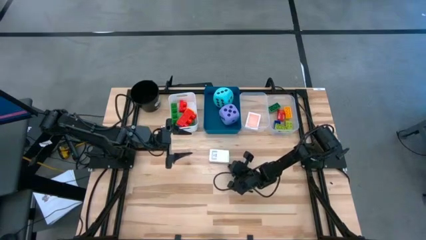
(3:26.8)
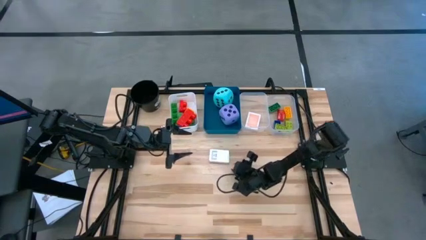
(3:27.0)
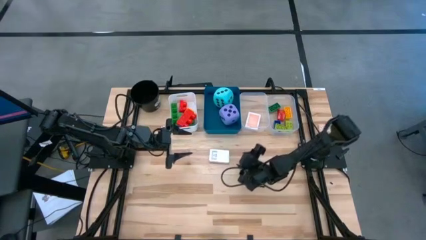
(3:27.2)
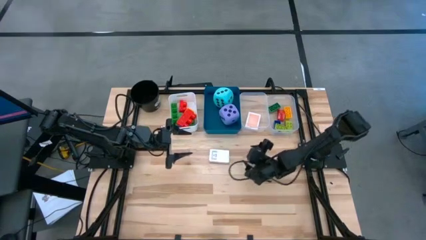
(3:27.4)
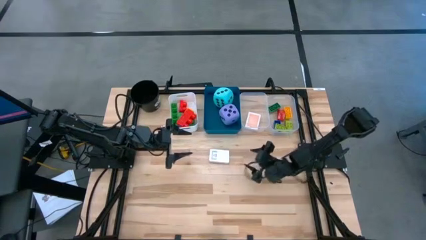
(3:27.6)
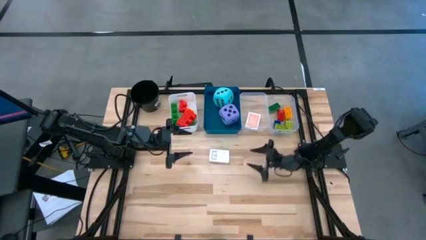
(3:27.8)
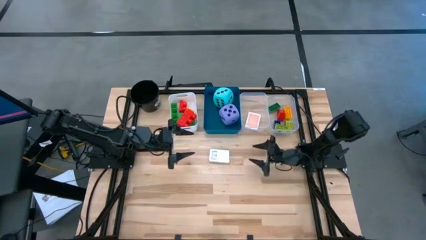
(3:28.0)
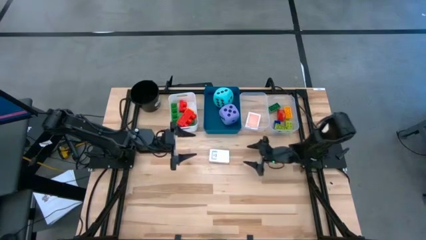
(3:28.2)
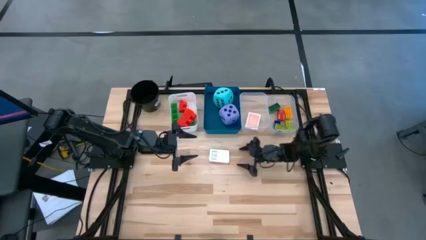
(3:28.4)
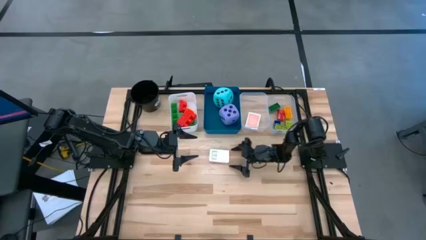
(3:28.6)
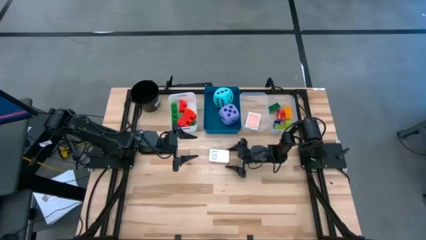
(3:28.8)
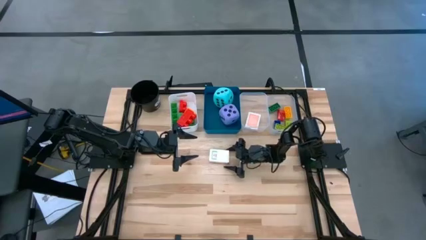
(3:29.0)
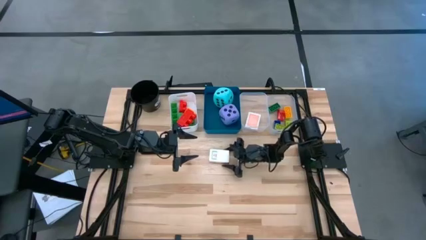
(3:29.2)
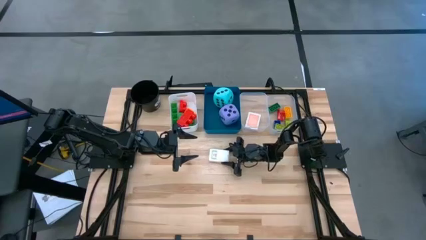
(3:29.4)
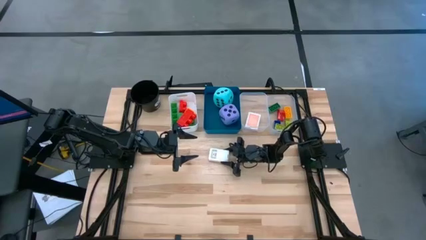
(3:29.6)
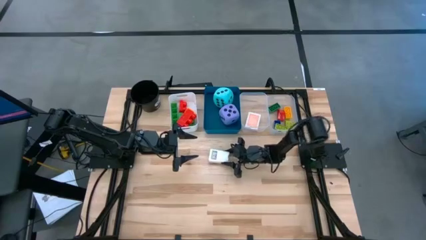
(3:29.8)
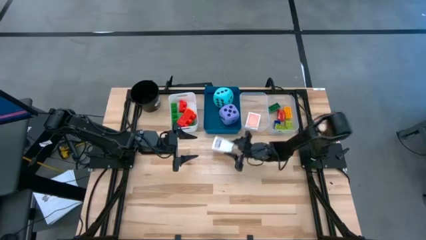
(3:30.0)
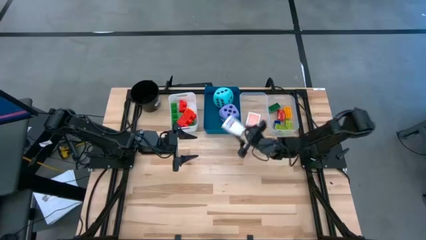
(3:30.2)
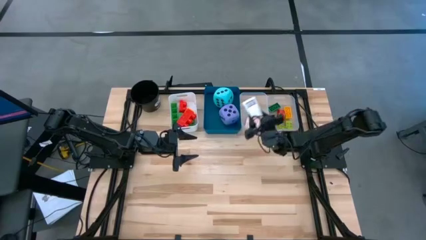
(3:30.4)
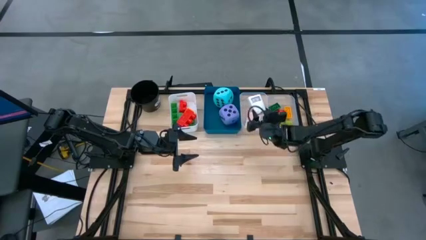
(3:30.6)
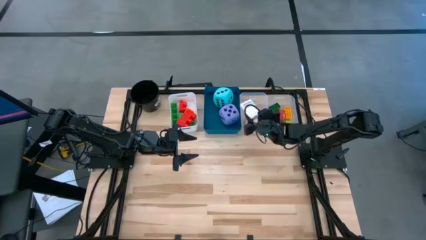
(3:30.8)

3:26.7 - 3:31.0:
Task: Pick & Place Toys
Put the white deck of cards into the left transparent bin

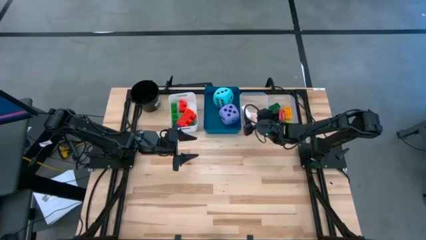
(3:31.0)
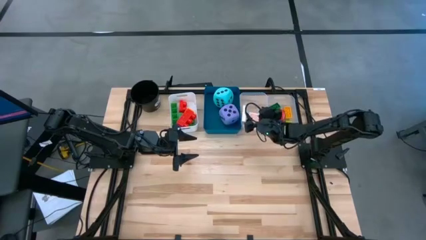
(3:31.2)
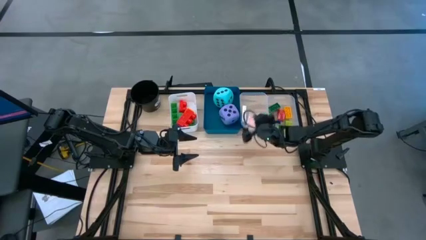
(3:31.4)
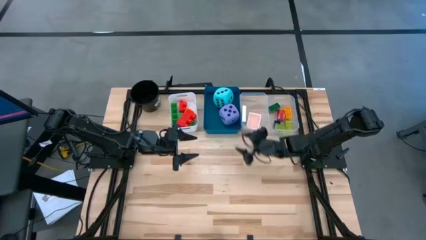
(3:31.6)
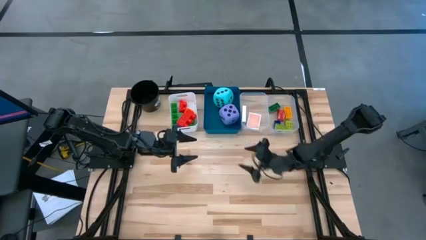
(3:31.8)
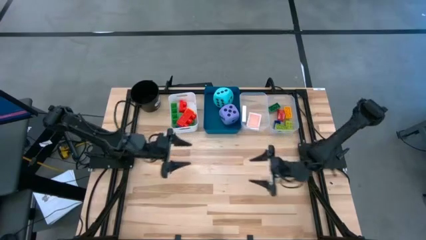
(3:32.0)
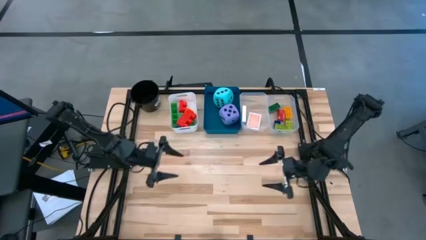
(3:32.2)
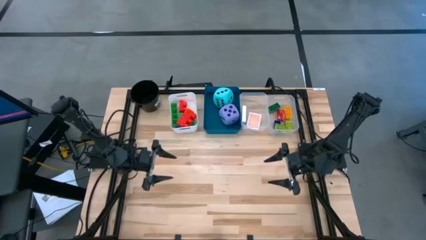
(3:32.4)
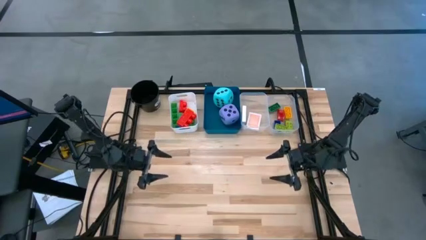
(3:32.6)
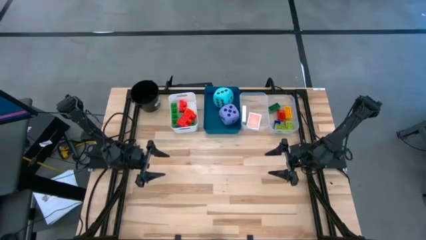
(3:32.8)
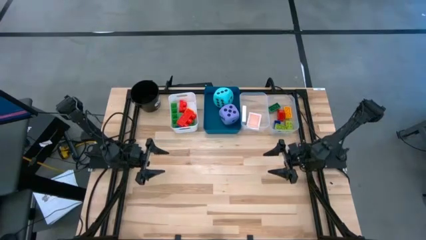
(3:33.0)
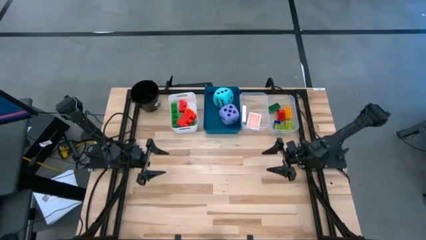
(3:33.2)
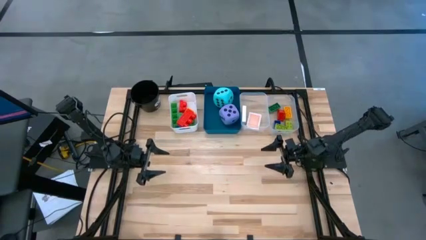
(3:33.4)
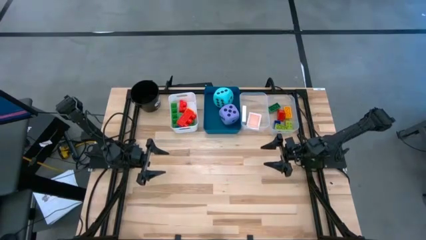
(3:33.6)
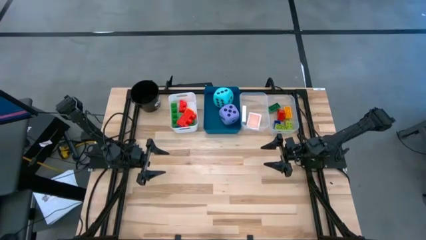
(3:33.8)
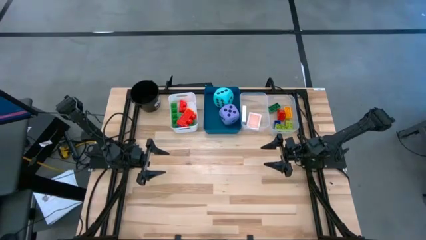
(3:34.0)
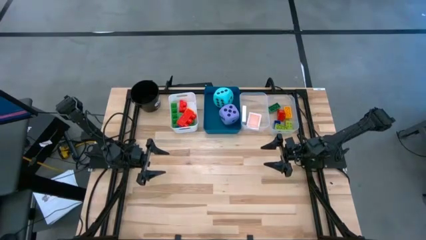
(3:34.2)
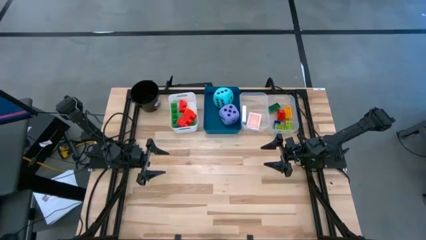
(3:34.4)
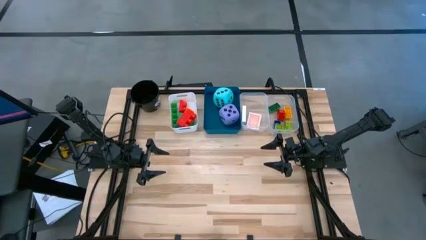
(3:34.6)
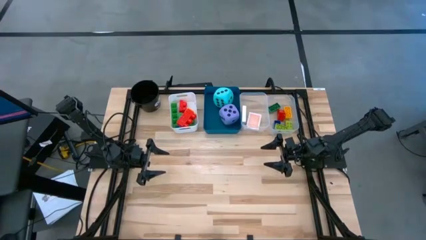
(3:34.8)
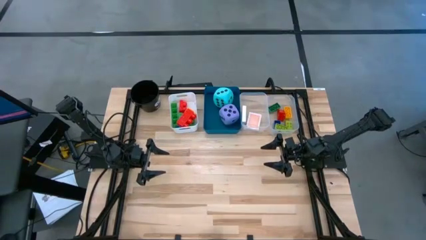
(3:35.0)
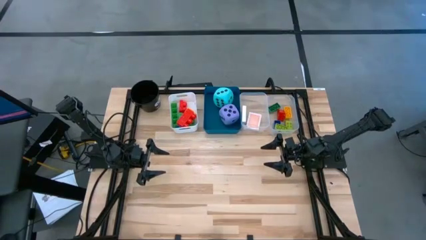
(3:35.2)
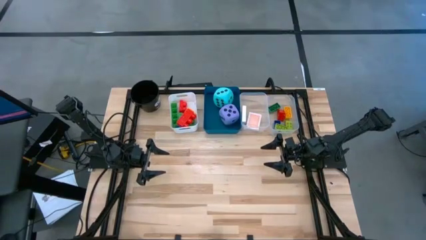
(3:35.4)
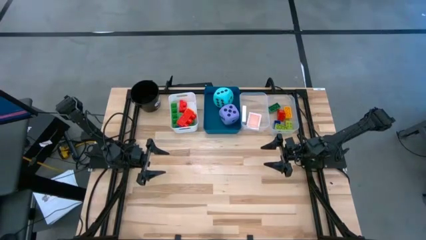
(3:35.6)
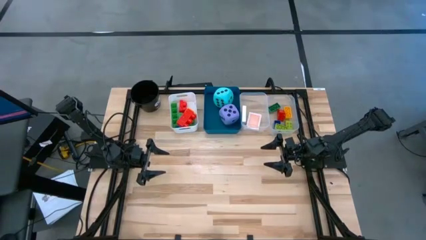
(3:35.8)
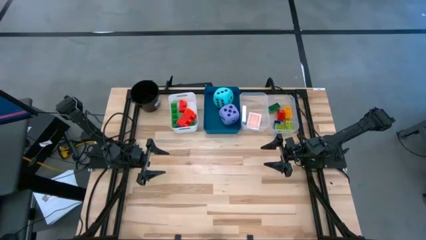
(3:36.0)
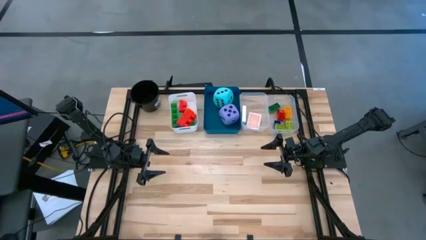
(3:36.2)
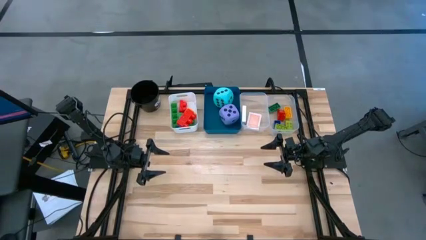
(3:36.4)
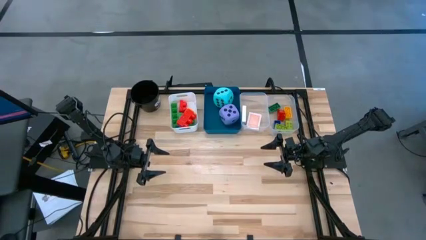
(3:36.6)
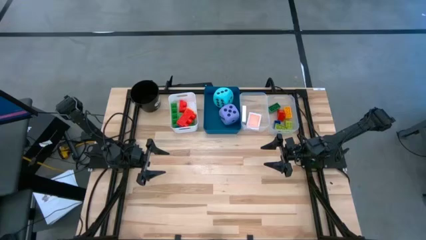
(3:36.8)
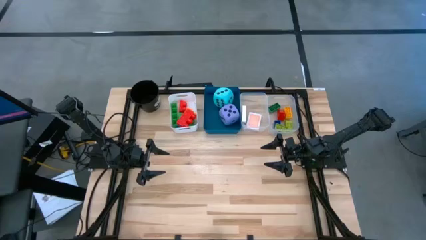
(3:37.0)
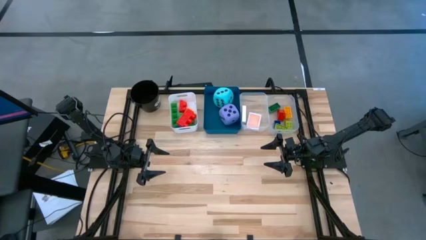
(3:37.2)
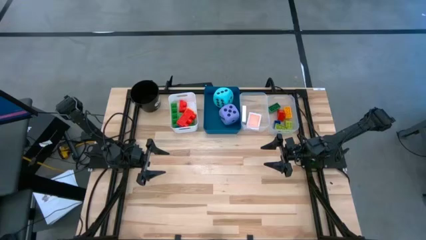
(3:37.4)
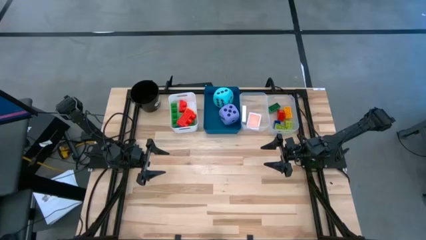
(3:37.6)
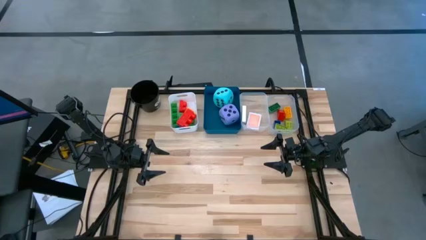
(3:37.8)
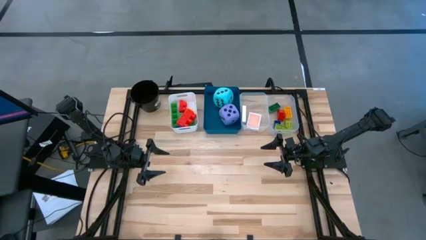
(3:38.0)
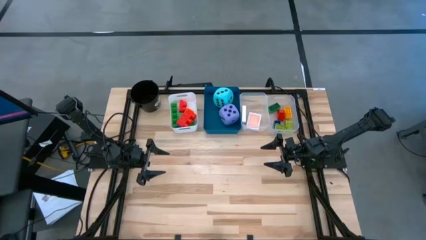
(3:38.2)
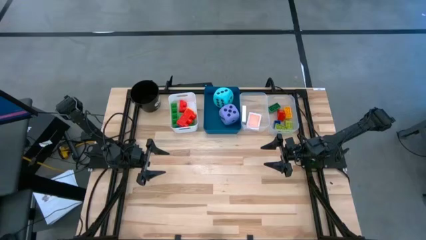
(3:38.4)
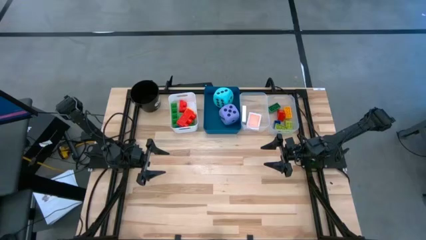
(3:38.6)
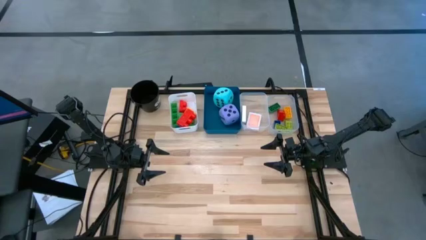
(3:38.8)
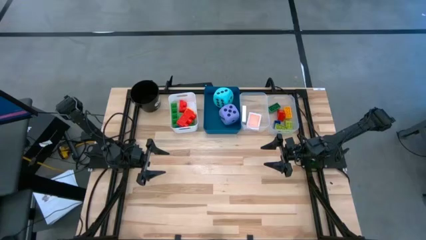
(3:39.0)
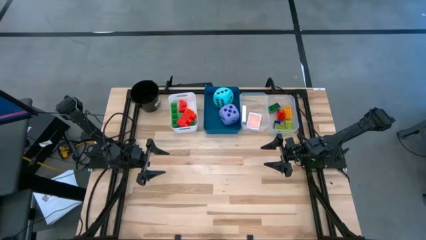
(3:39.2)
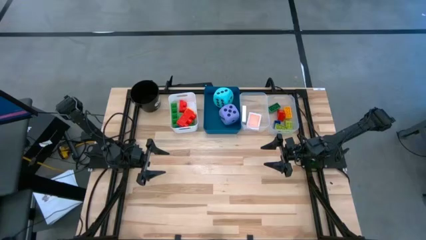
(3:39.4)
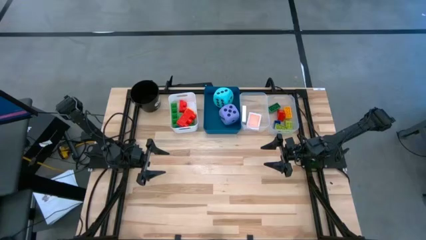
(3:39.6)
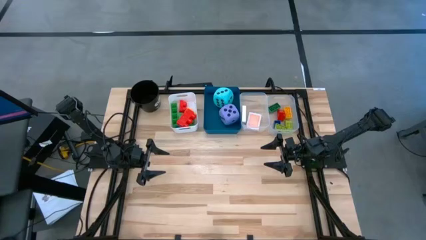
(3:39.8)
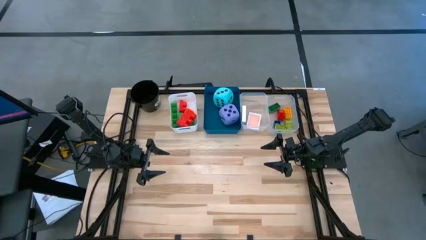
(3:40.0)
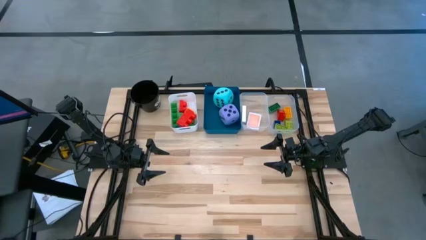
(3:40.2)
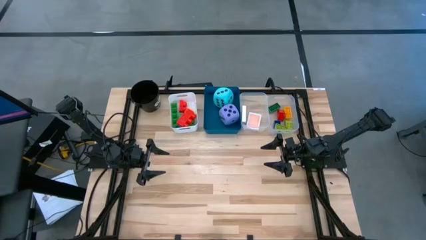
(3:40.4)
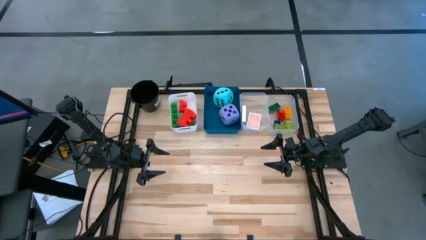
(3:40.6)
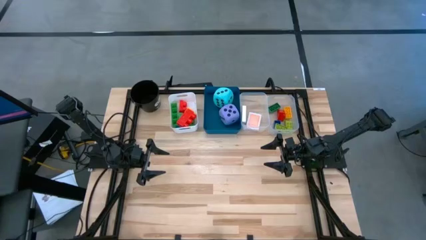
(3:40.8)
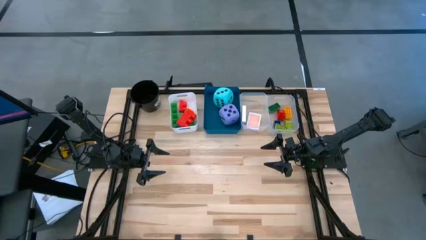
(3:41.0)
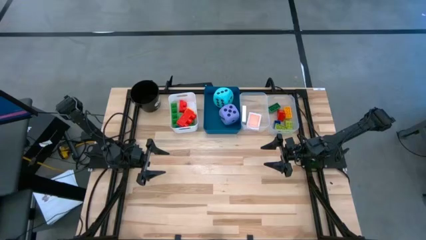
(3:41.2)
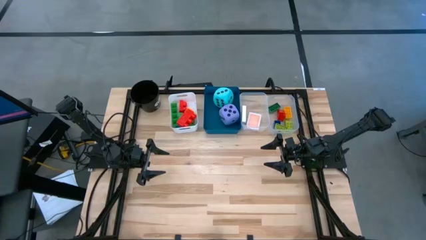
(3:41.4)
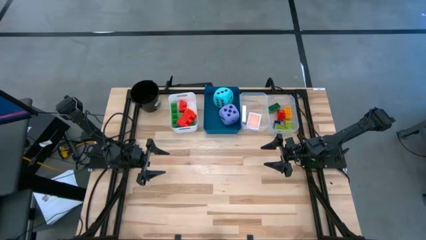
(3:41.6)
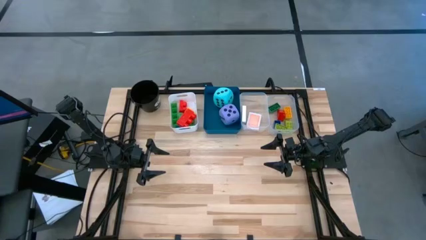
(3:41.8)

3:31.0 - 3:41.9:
Return to Home Position

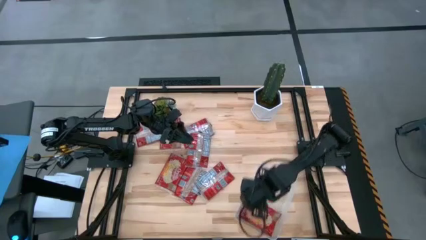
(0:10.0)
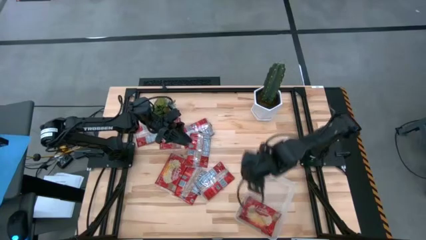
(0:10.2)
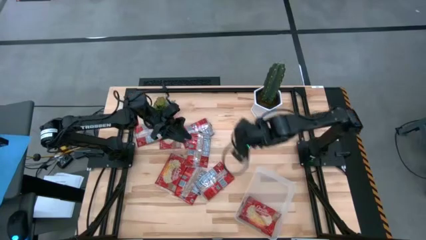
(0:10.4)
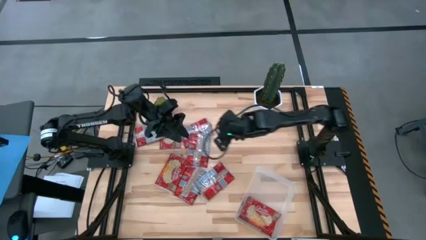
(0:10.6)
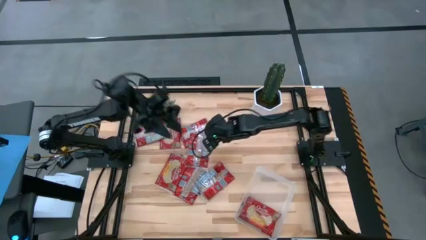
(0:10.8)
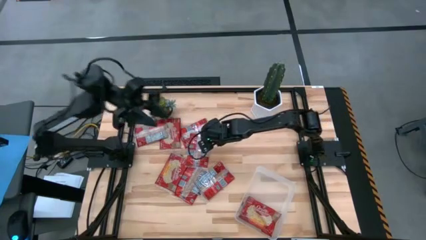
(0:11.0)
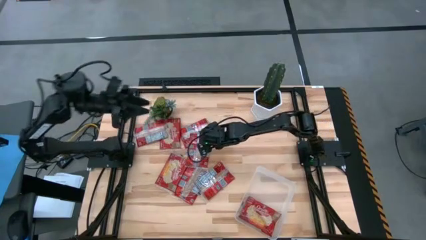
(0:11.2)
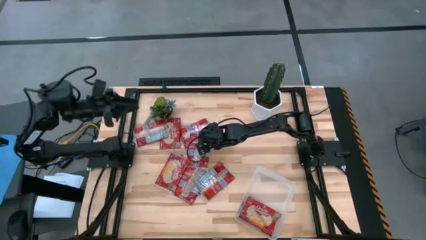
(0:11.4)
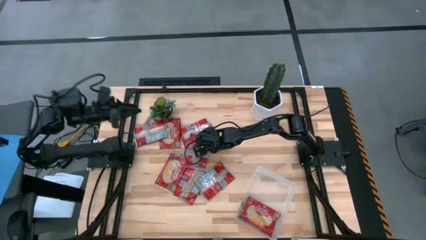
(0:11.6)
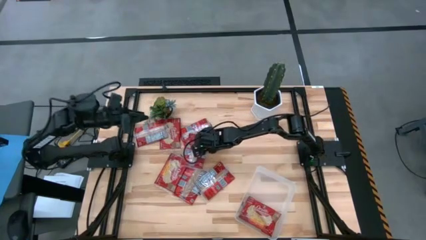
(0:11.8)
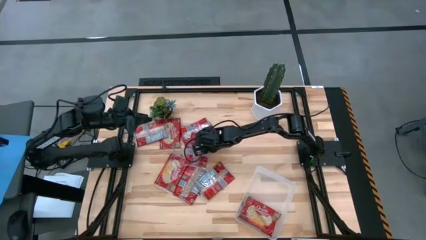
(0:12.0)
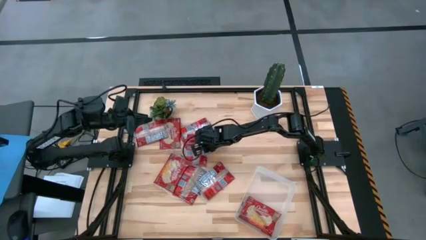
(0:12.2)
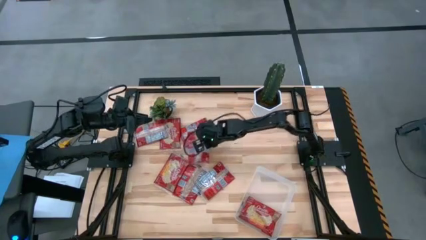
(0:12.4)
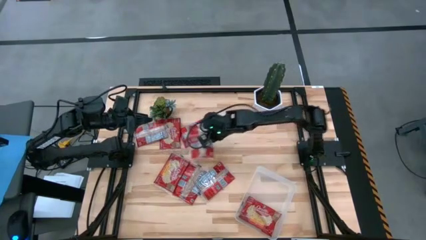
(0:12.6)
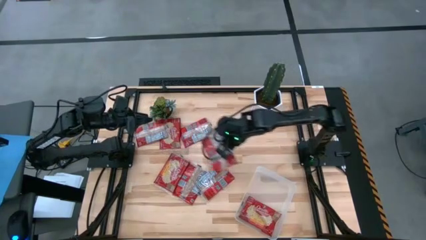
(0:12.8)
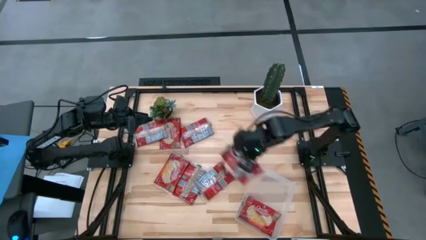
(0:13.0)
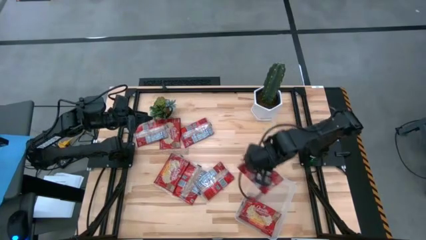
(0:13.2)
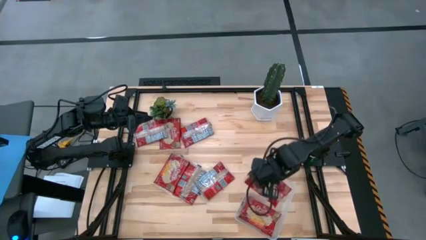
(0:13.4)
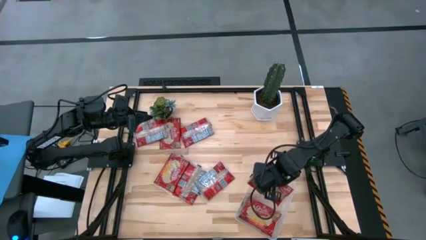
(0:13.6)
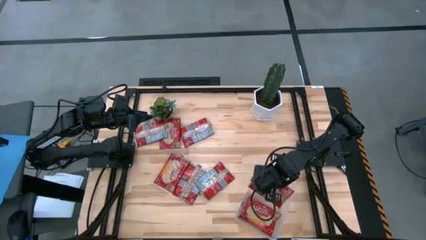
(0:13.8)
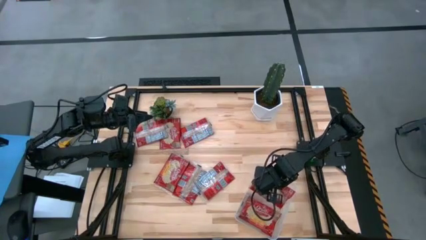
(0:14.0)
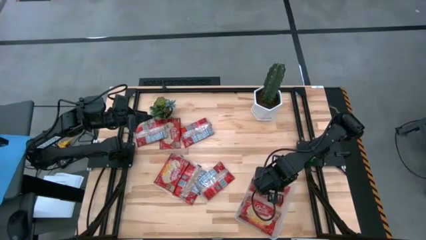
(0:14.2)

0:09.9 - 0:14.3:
Task: Sort popcorn bags into baskets
Put the red popcorn bag into the transparent bin
